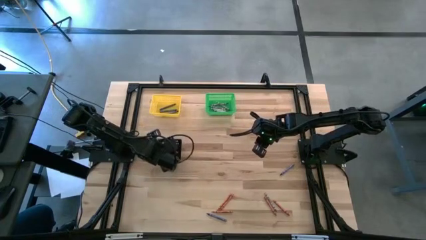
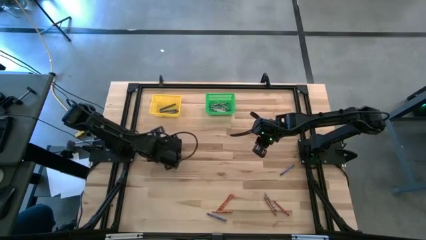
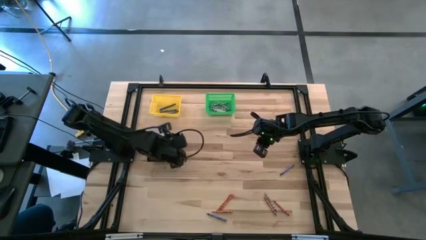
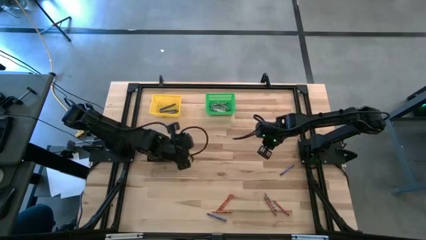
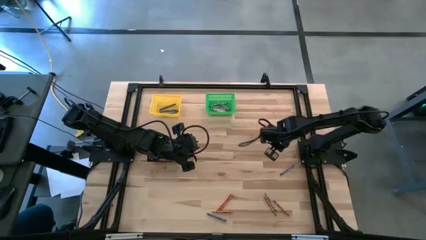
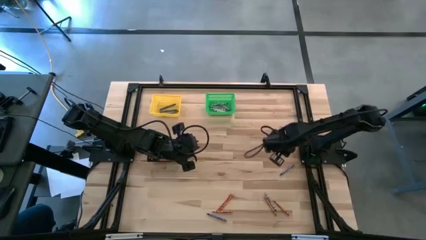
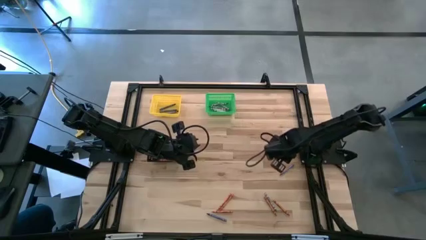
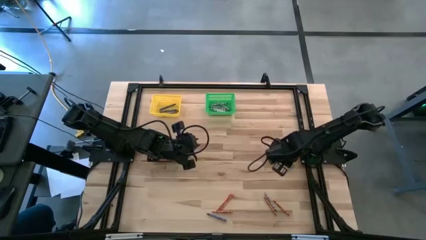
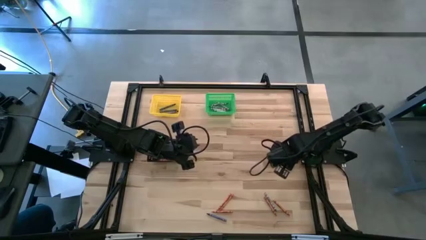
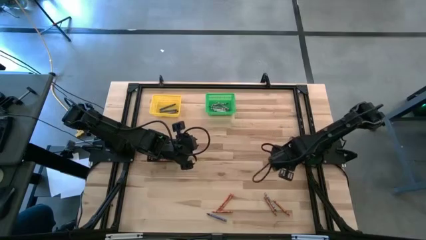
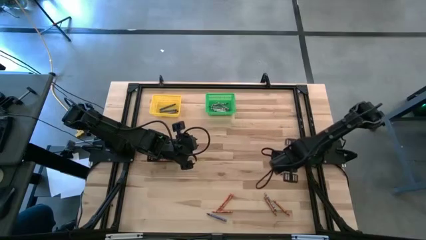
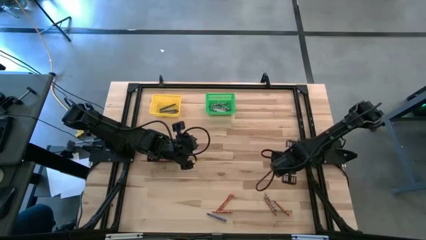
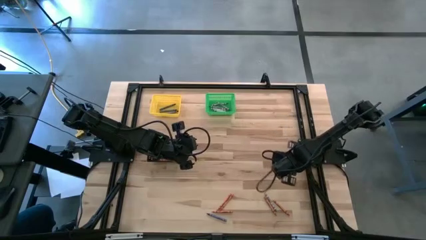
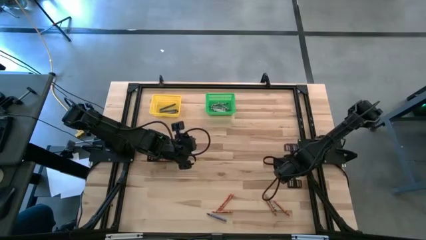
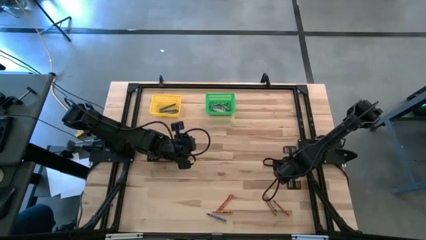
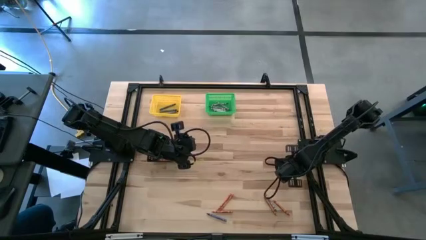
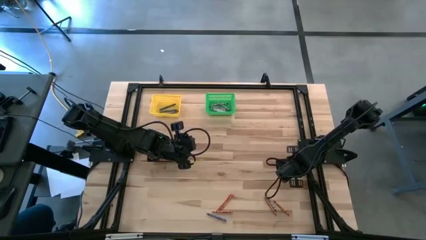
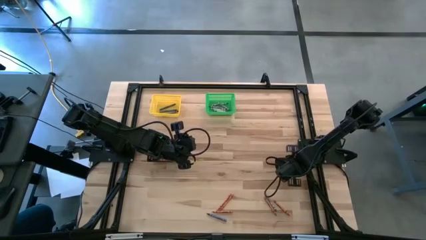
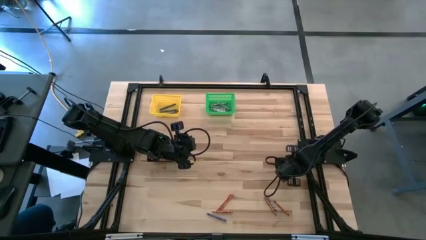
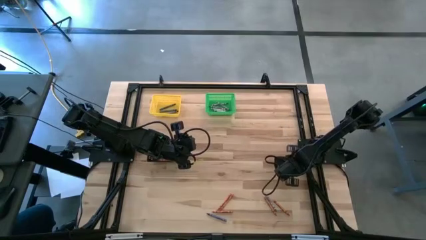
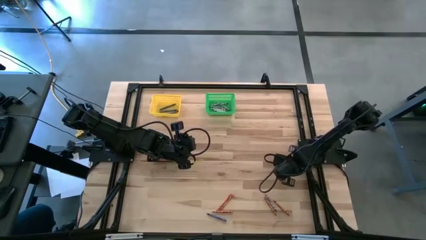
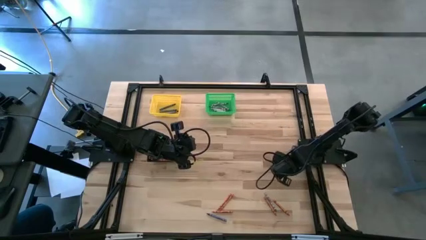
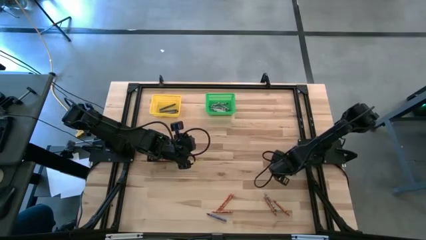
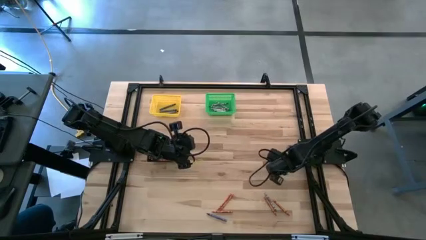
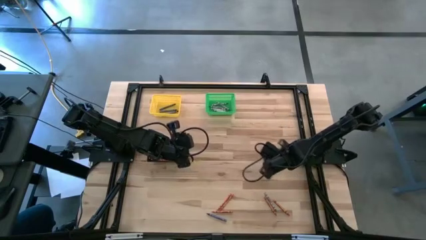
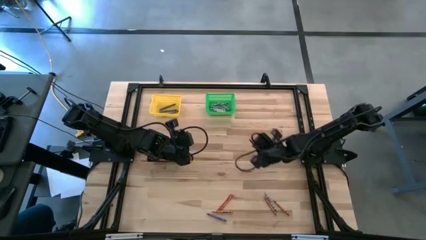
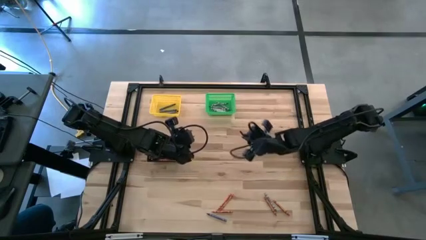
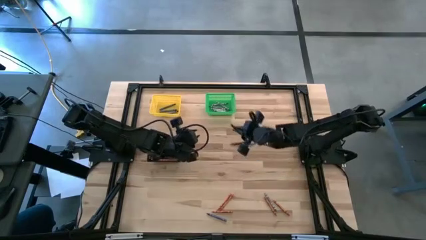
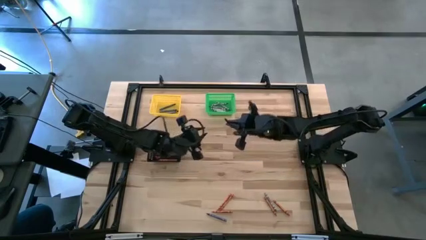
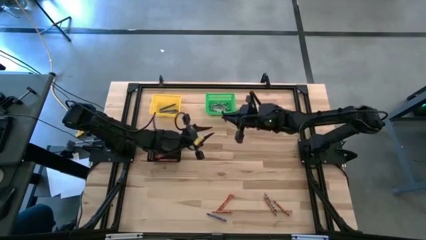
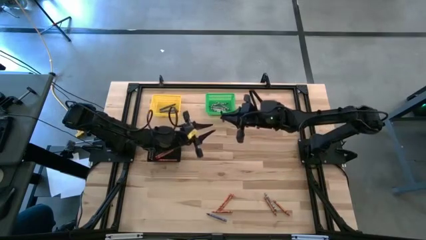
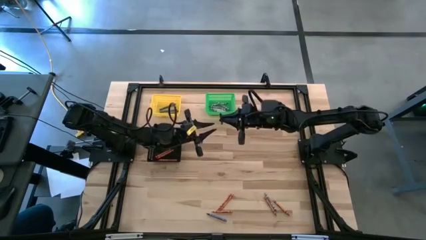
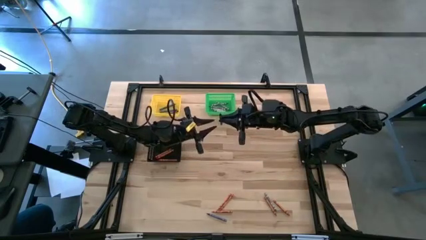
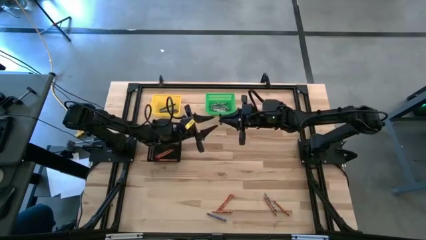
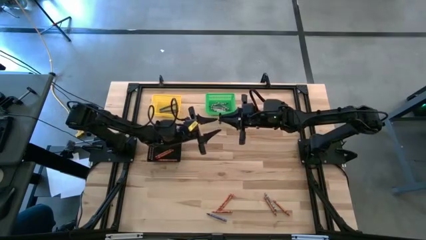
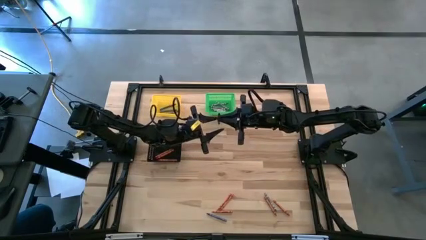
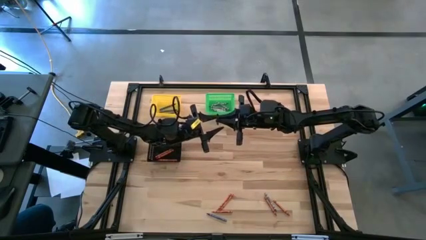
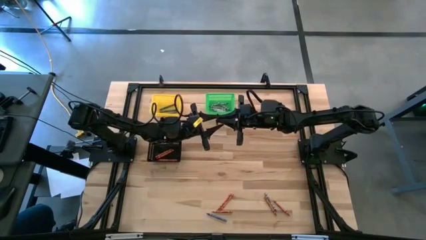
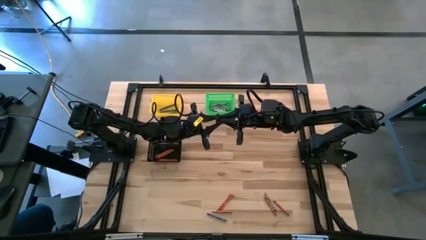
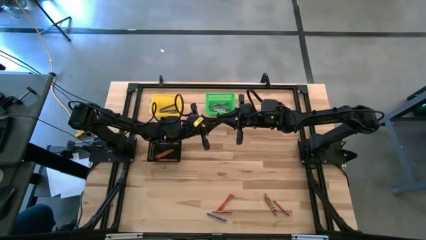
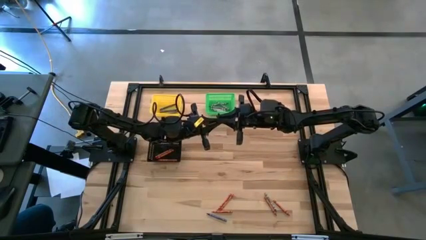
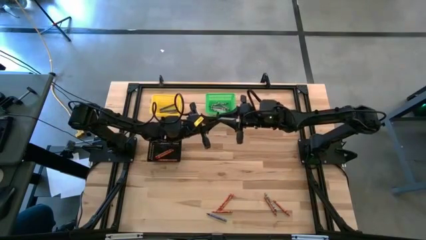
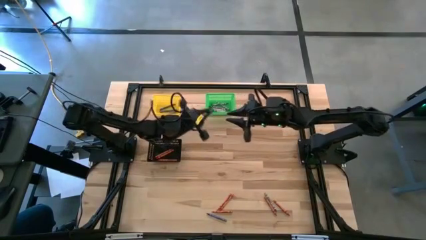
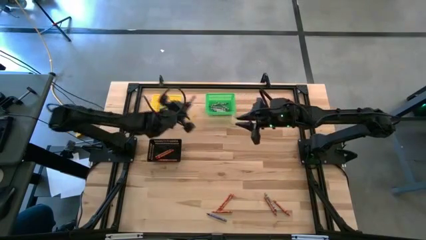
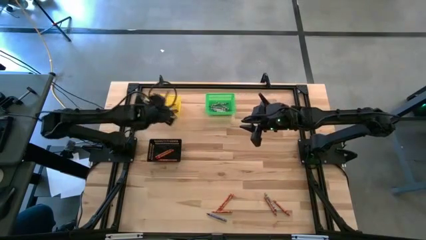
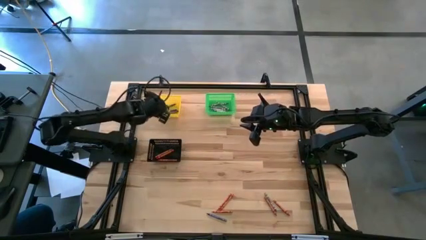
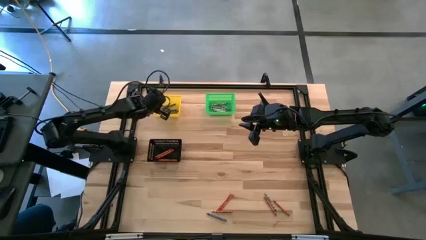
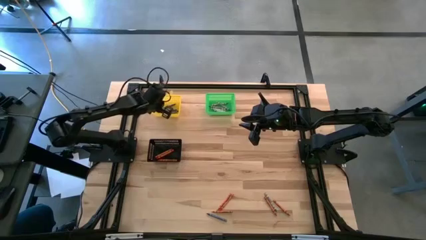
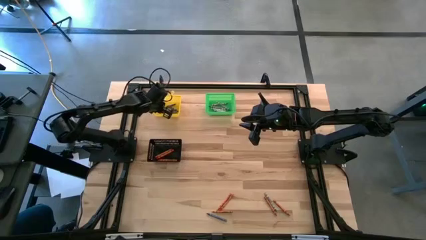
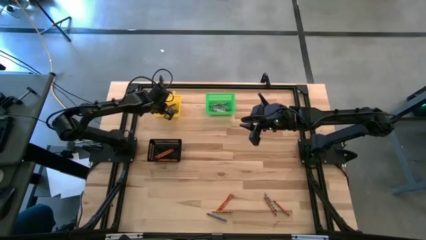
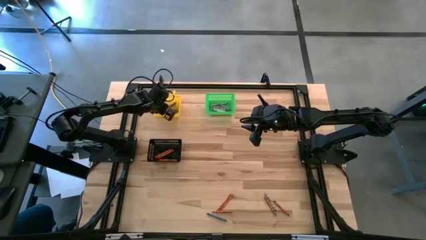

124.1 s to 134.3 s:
Task: Sort crayons
Put the blue crayon into the yellow bin

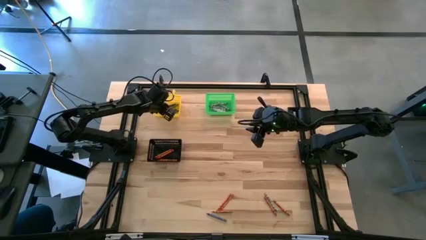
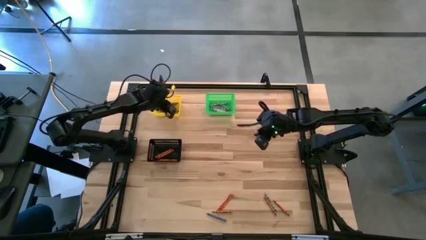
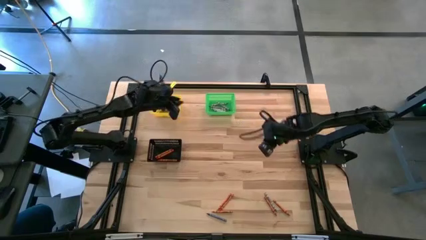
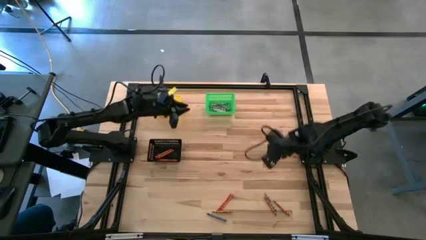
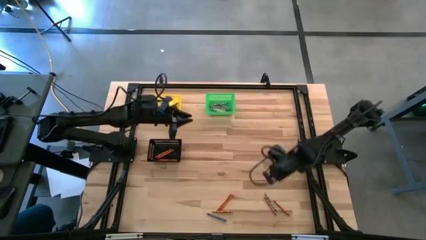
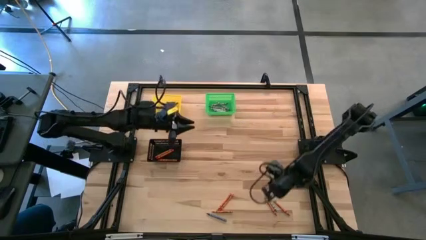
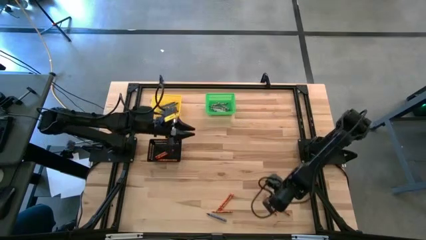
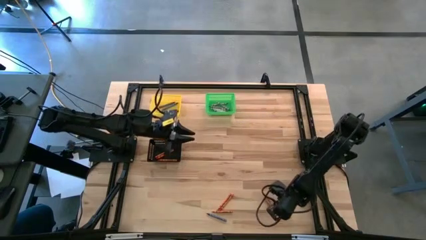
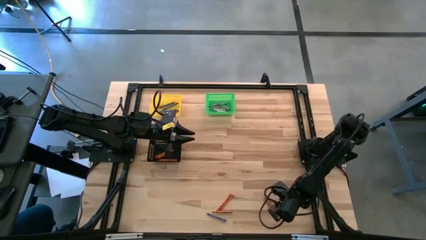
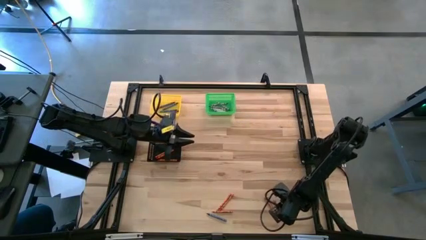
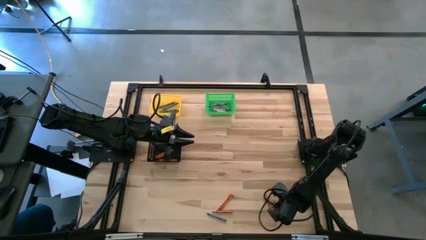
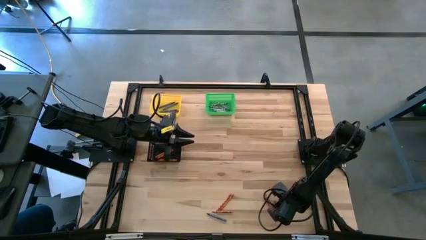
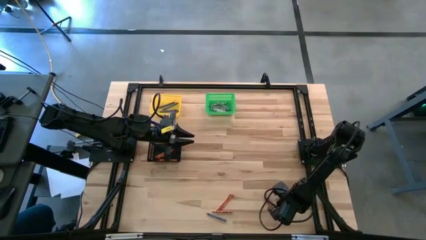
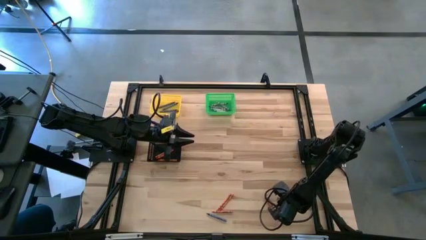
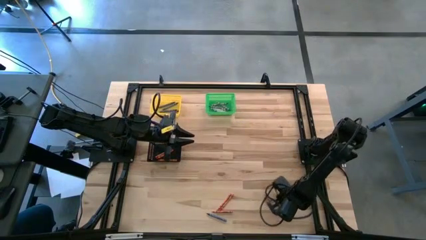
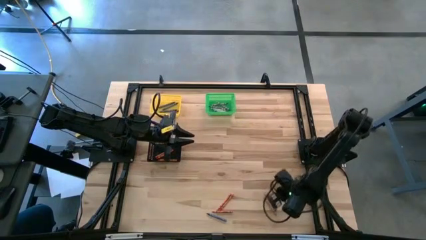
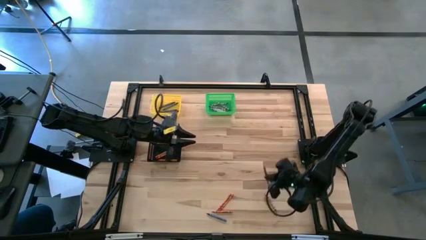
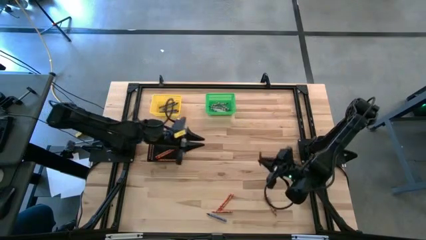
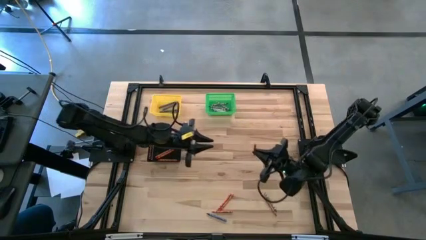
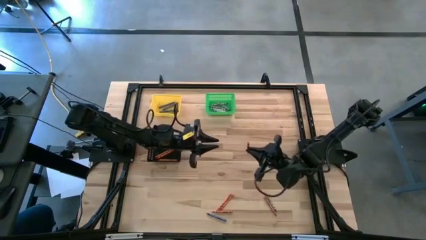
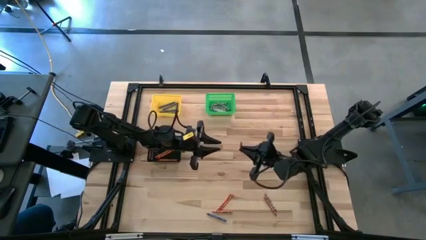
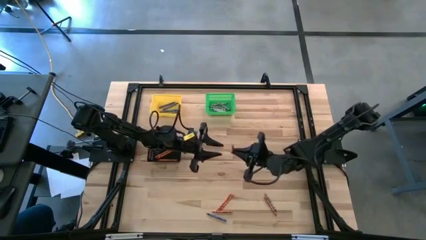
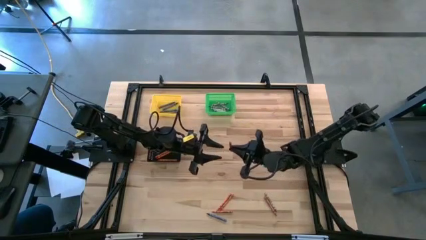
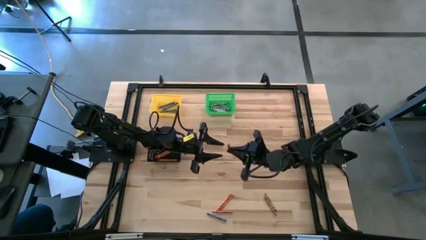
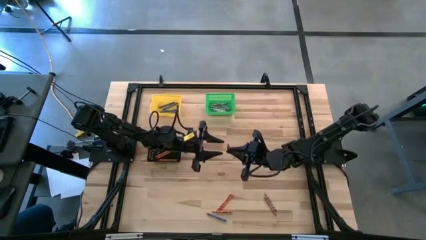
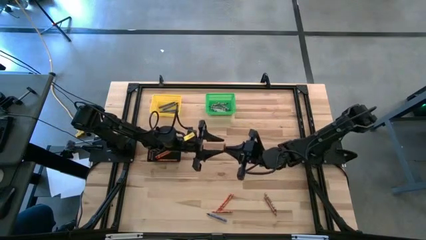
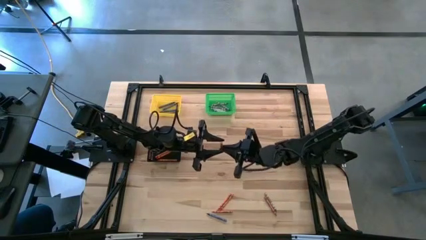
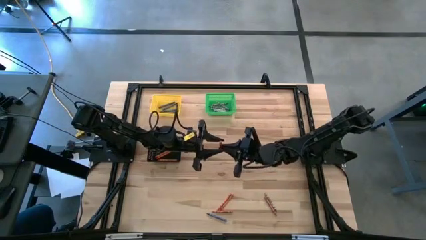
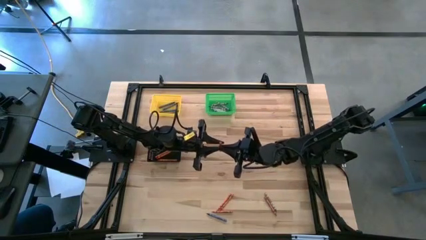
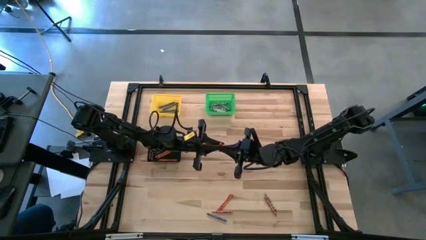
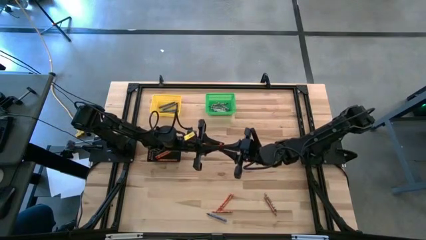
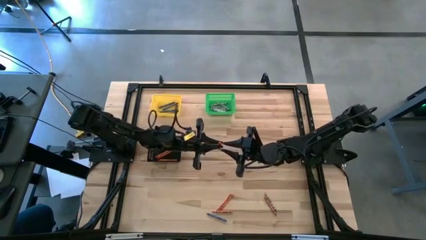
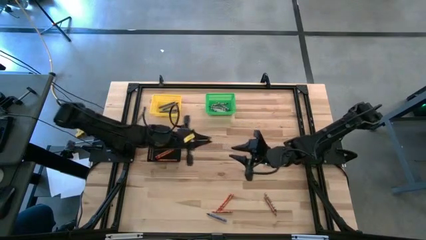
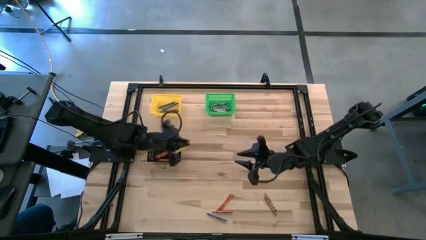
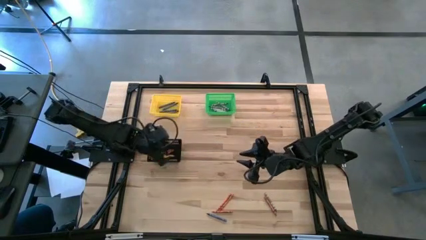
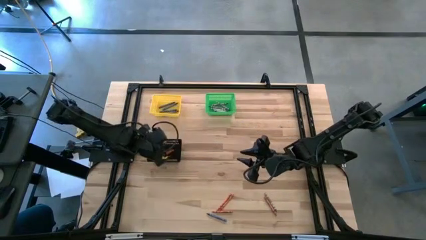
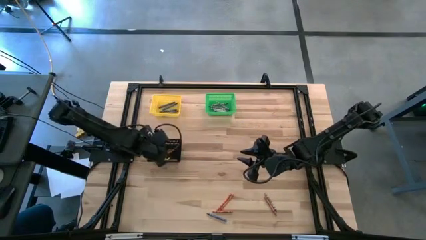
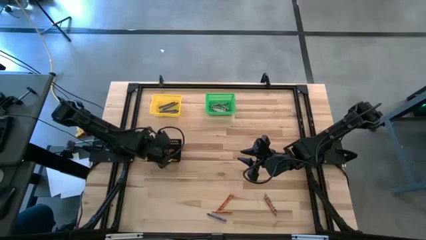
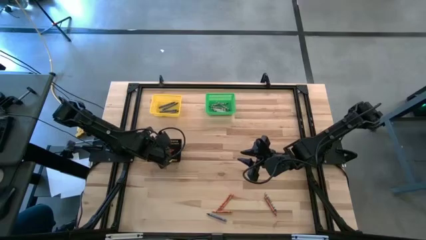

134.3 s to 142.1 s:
Put the orange crayon into the black bin
